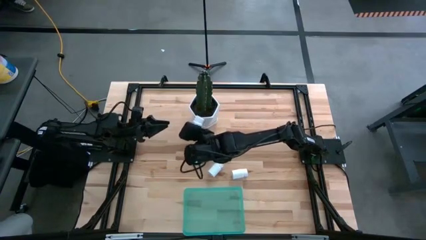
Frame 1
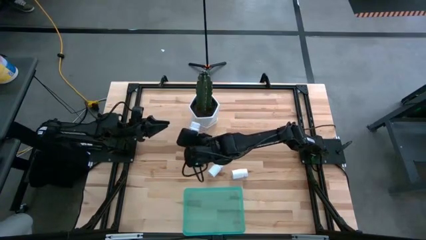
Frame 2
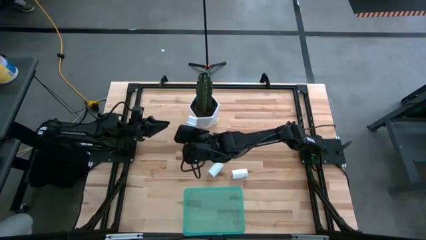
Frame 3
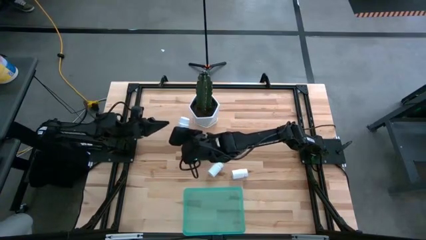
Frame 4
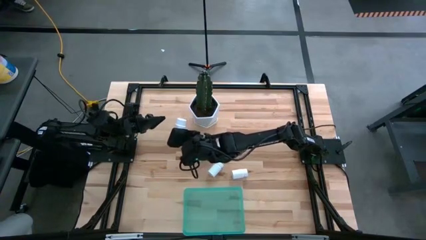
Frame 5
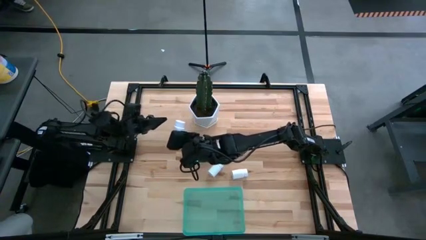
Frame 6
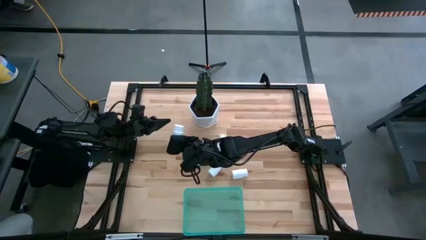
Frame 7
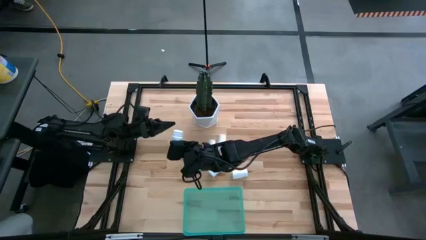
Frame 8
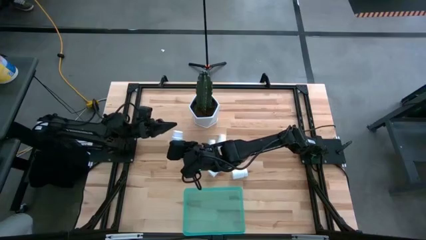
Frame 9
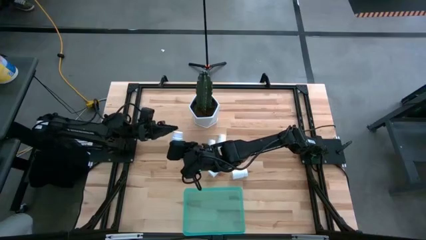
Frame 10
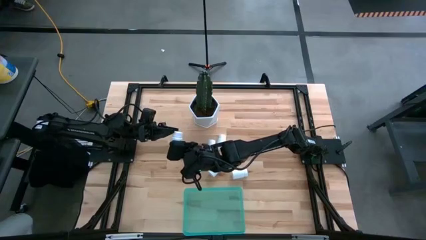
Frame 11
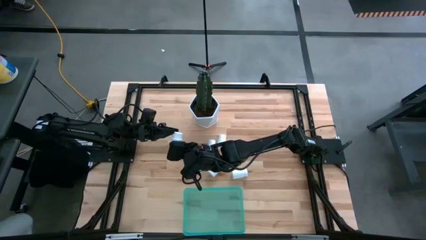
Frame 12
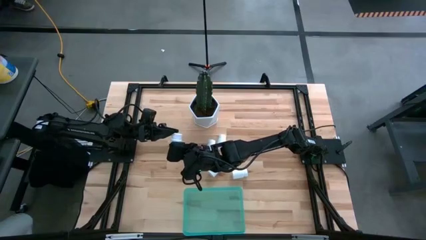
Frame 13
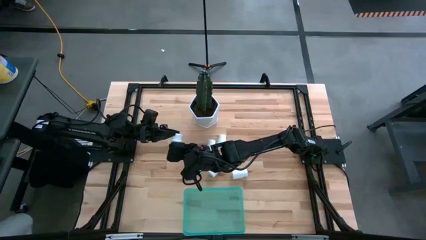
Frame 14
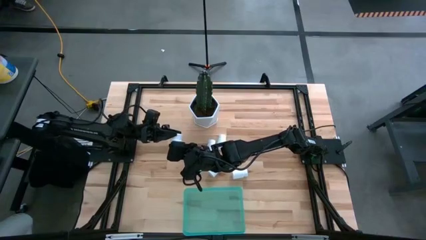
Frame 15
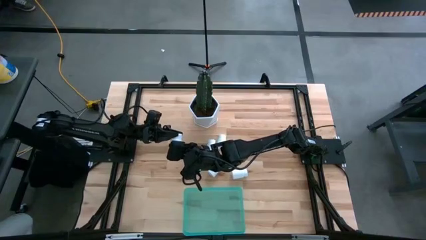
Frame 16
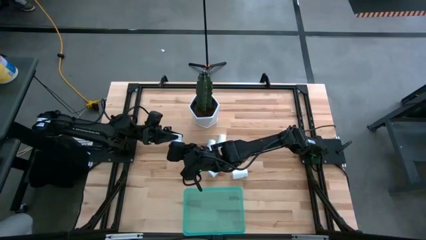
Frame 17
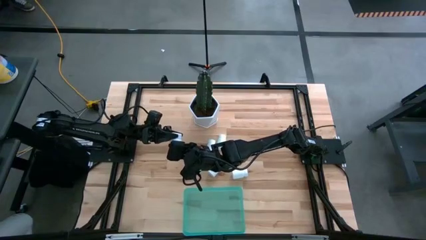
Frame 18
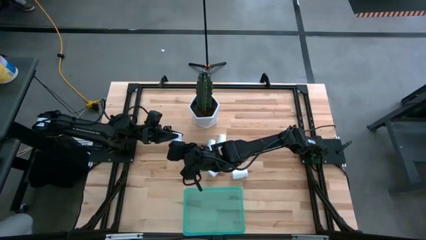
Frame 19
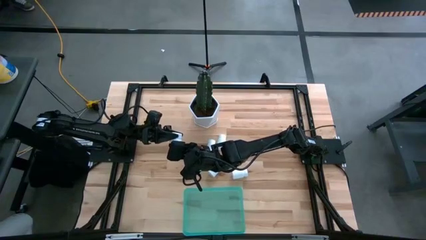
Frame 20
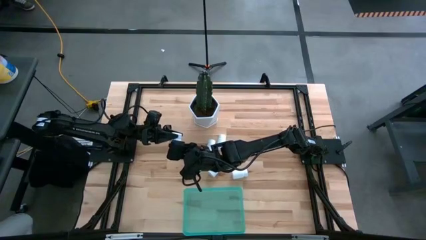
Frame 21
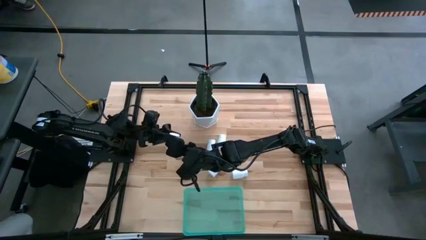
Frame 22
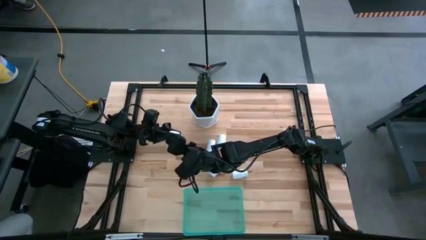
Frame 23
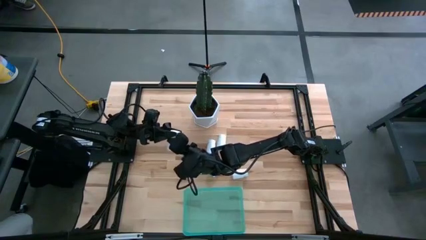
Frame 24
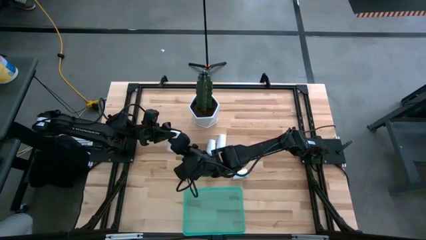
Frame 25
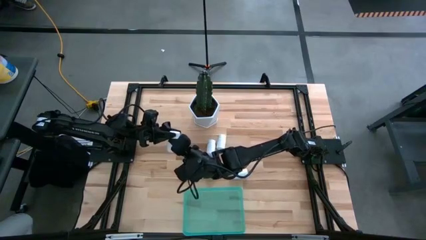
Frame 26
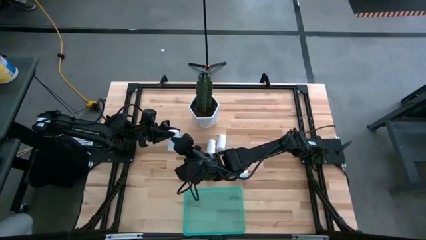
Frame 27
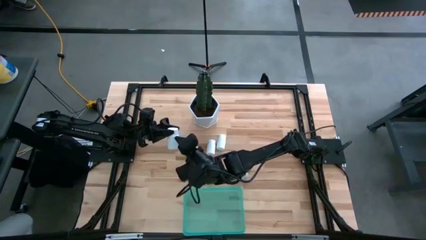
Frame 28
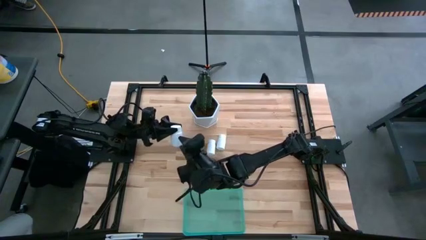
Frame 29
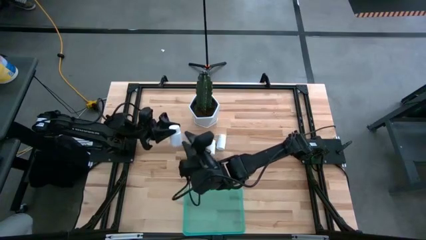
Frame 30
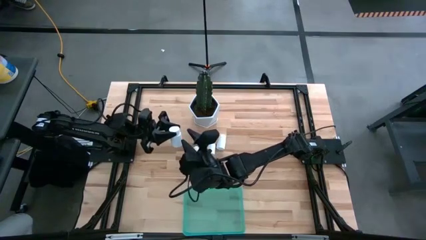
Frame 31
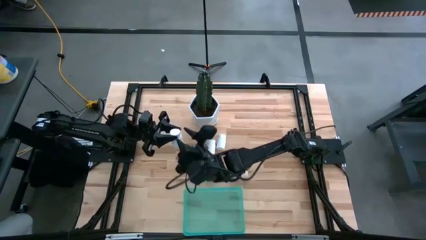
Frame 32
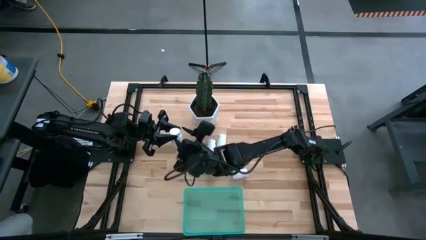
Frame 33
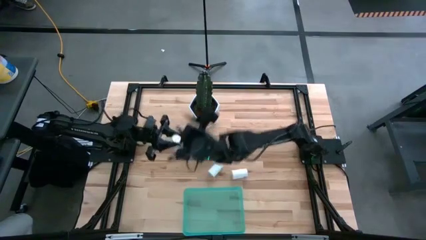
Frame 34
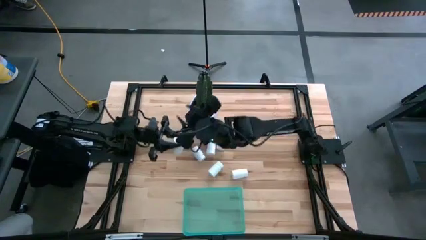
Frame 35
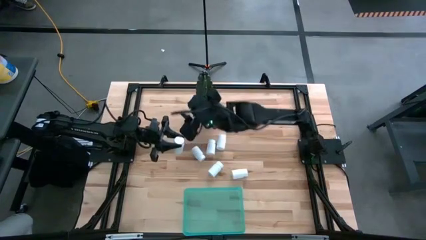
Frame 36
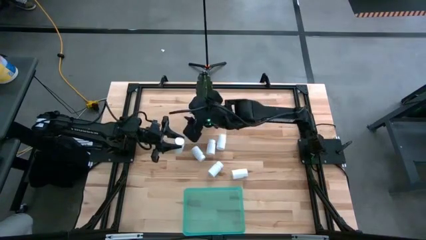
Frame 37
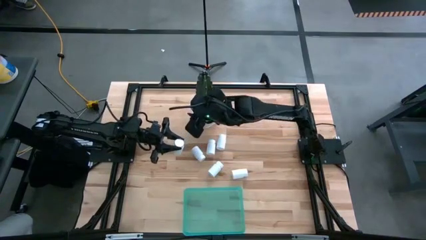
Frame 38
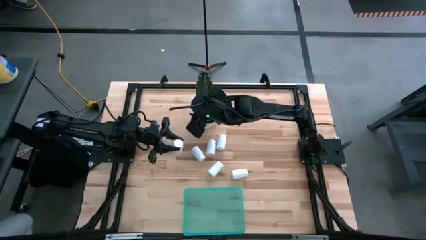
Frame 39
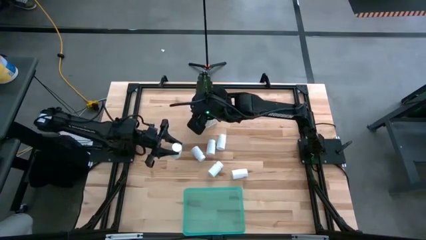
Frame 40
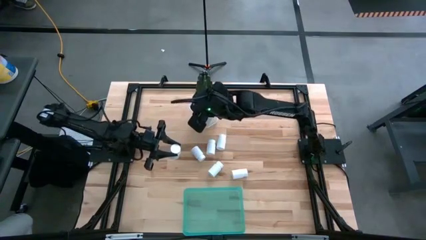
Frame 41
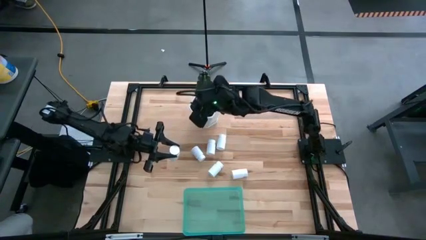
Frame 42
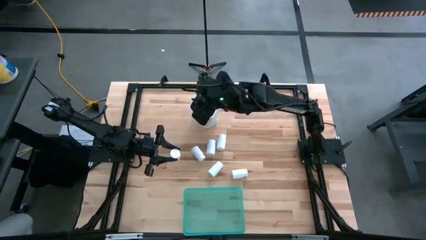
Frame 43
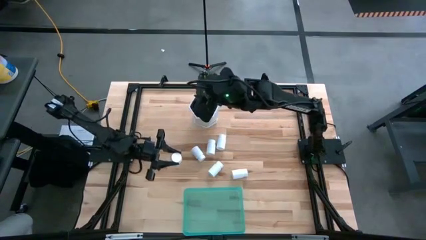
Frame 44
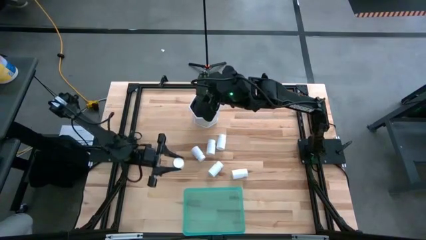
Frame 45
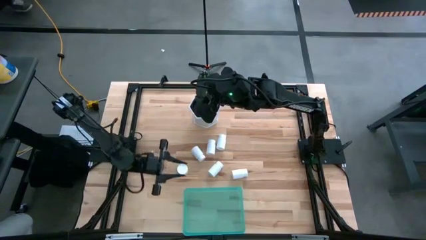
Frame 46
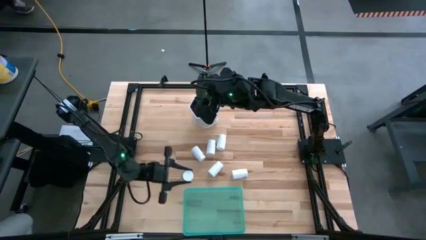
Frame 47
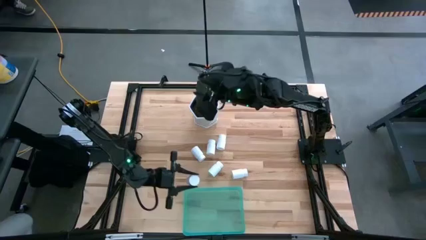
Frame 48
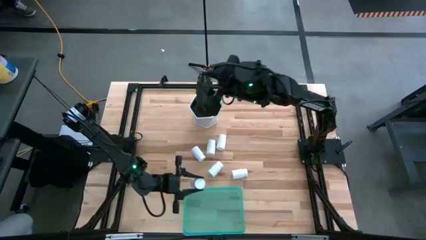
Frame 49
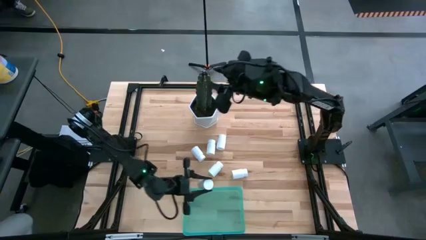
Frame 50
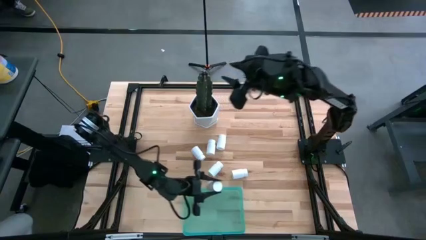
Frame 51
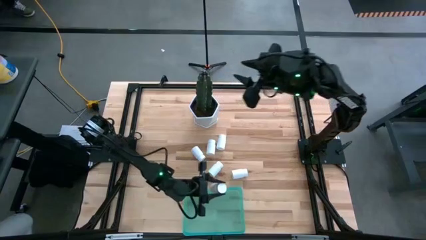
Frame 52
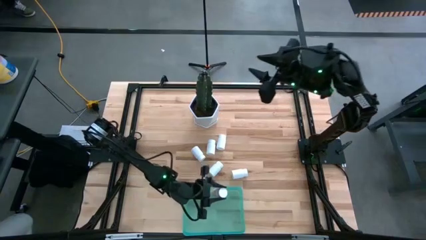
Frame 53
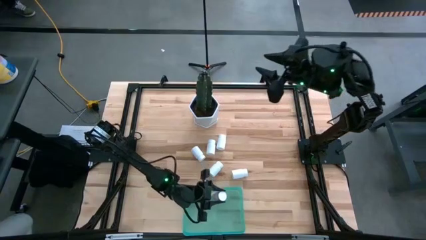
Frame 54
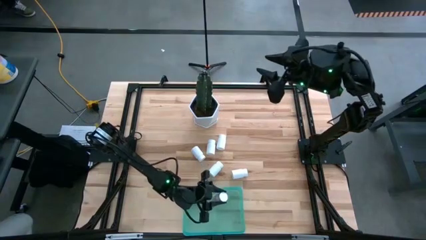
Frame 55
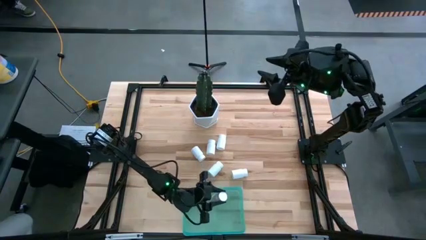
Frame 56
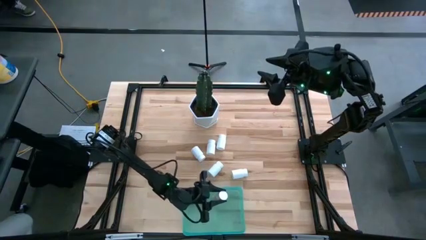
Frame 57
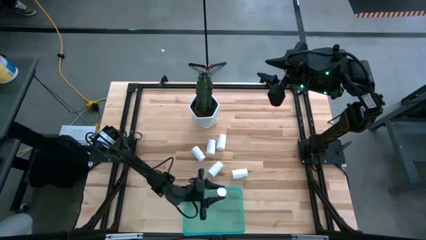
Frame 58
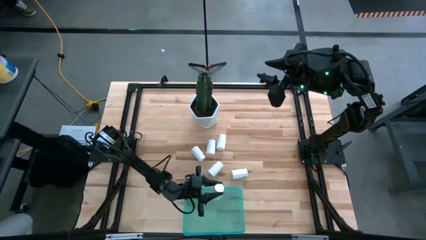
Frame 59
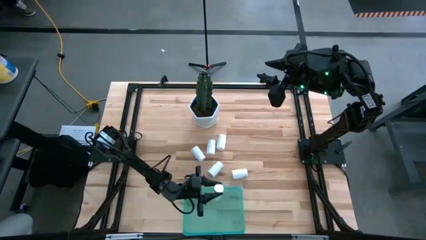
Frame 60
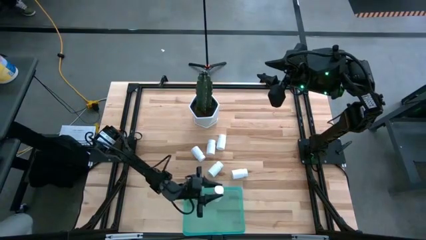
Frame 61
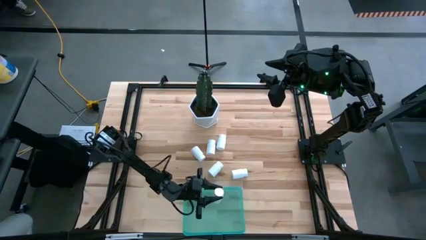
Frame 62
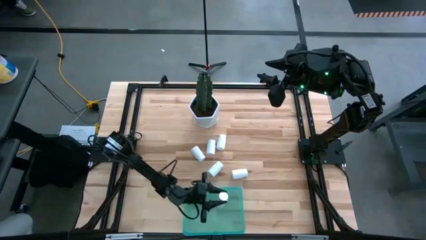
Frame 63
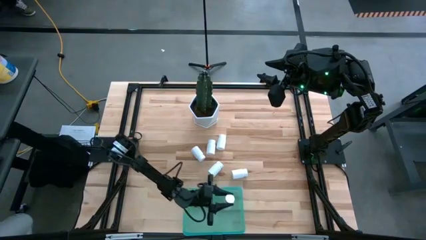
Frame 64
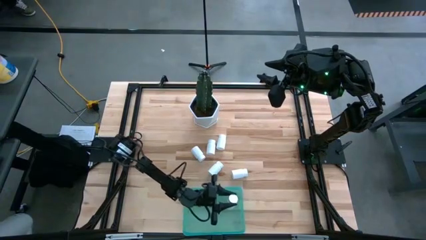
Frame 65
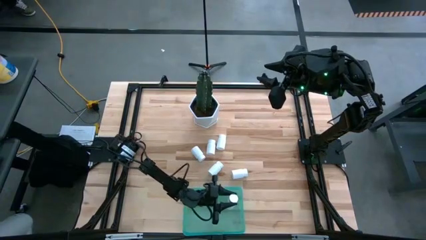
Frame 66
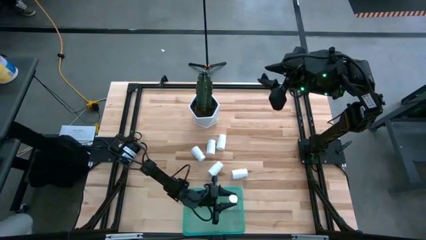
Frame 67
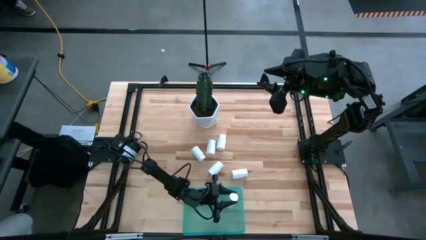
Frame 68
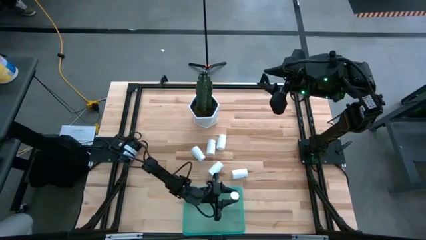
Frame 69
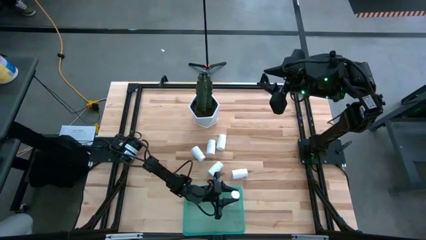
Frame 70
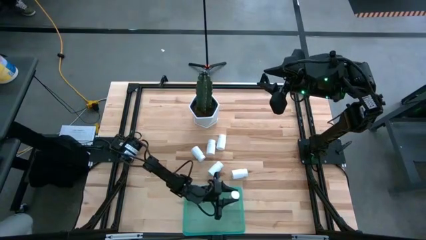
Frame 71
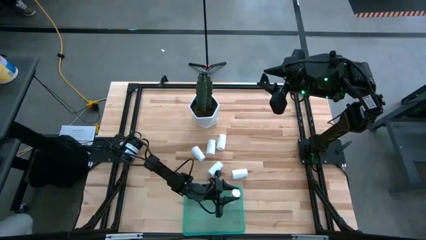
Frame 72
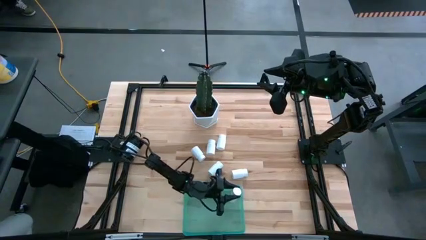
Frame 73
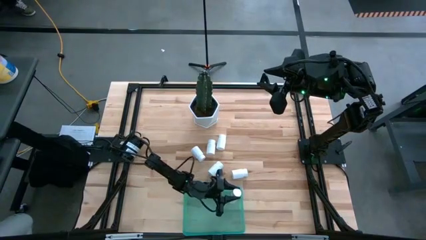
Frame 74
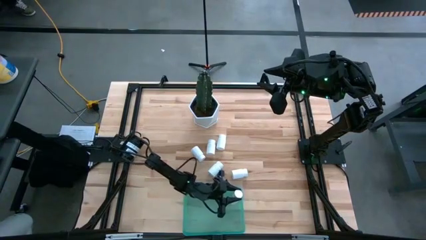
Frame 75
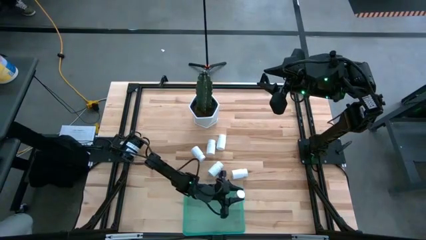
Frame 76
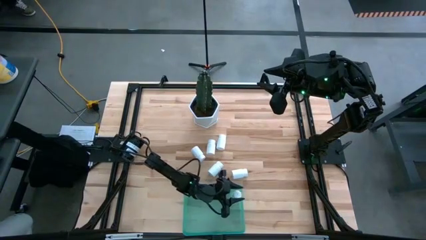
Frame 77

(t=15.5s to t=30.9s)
Task: Pick and place pill bottles into a basket
Put the white pill bottle into the bin
